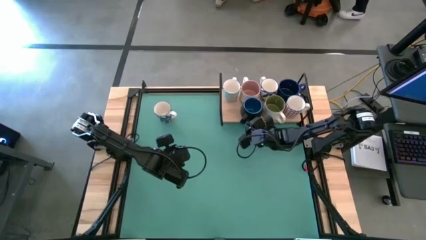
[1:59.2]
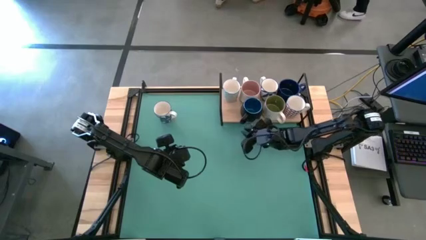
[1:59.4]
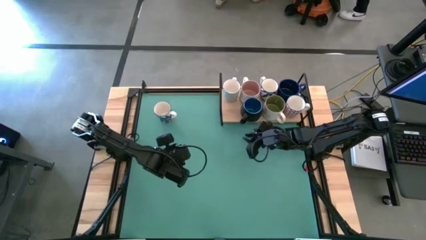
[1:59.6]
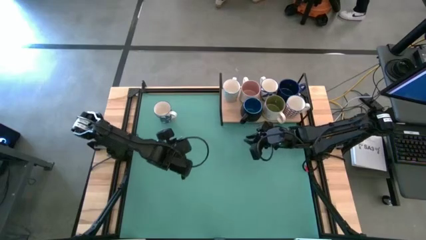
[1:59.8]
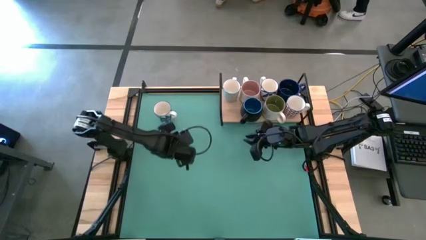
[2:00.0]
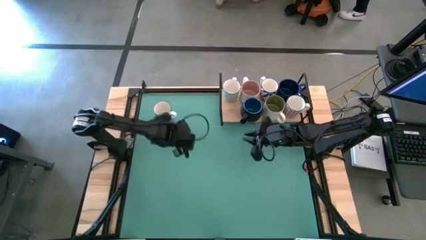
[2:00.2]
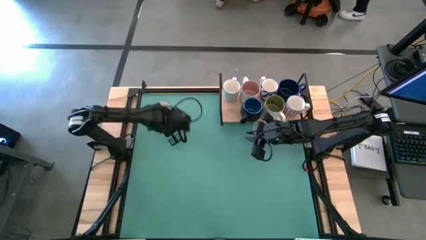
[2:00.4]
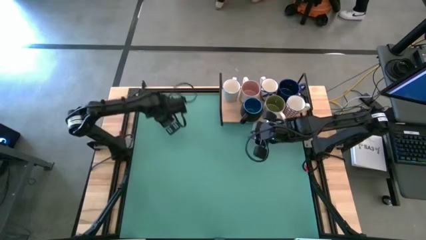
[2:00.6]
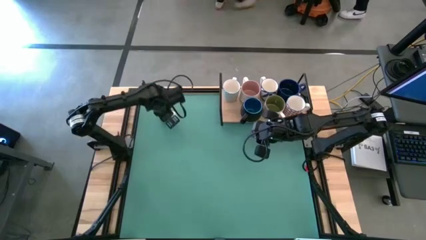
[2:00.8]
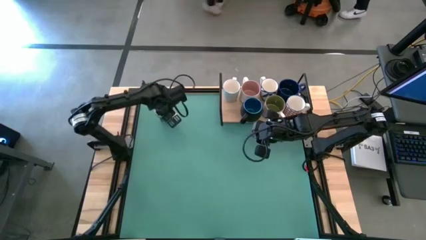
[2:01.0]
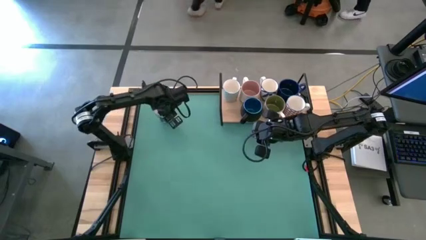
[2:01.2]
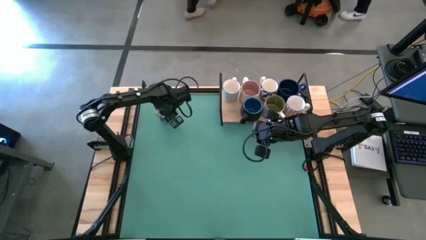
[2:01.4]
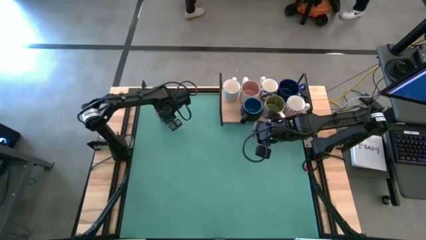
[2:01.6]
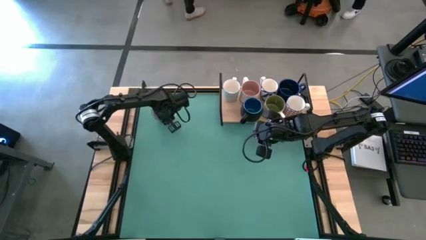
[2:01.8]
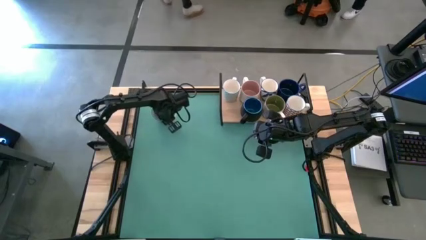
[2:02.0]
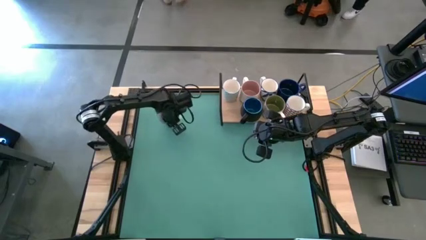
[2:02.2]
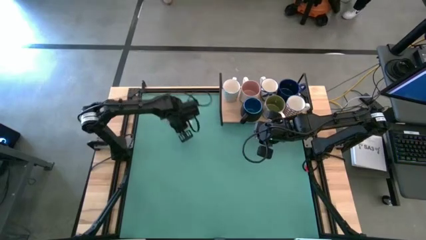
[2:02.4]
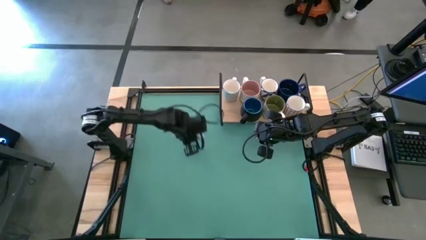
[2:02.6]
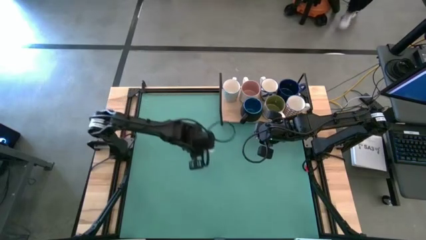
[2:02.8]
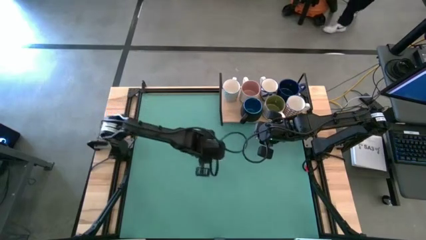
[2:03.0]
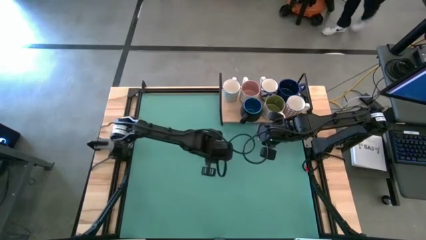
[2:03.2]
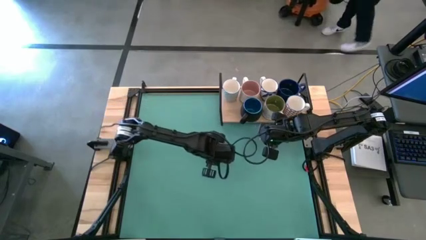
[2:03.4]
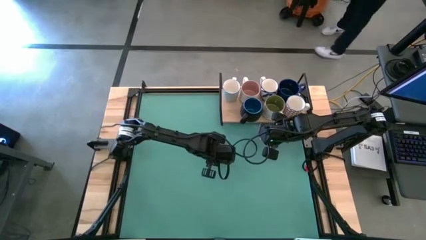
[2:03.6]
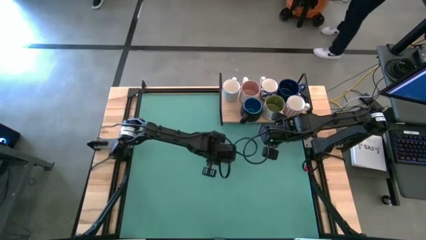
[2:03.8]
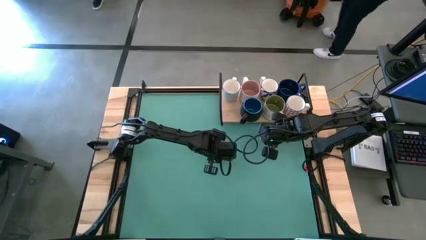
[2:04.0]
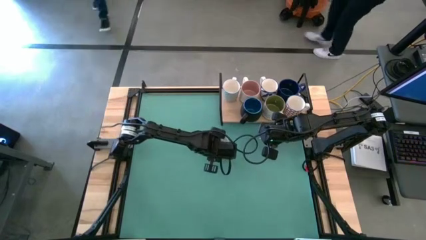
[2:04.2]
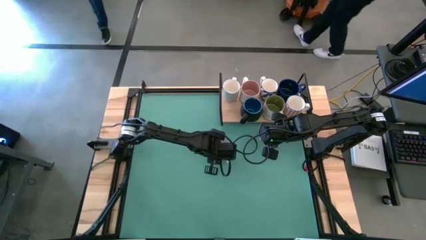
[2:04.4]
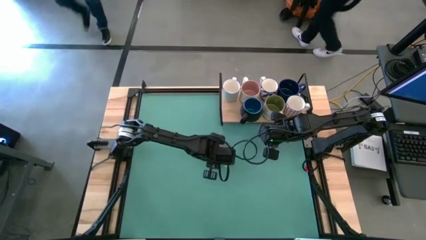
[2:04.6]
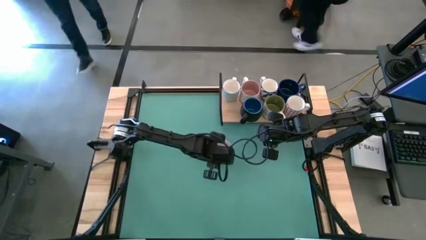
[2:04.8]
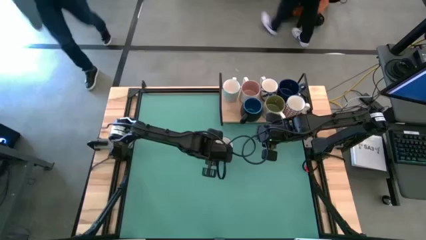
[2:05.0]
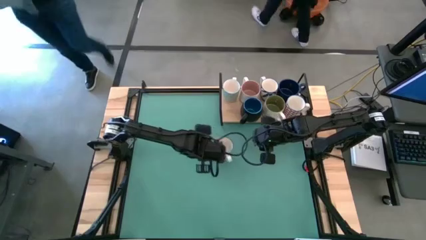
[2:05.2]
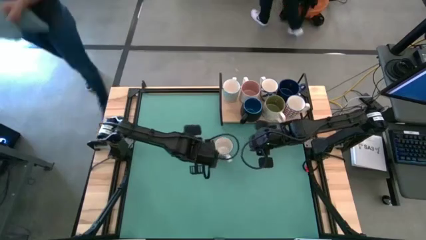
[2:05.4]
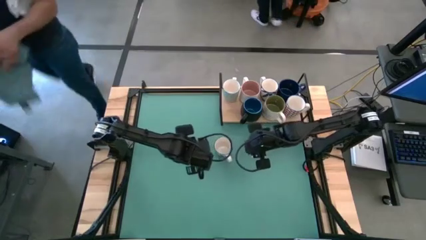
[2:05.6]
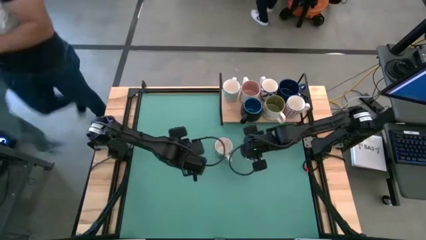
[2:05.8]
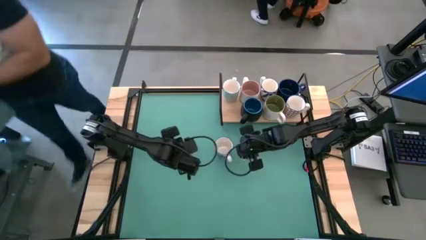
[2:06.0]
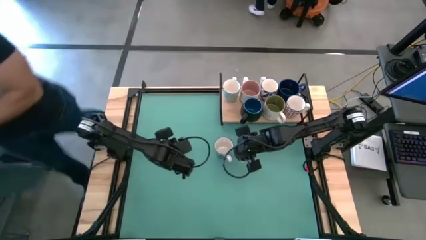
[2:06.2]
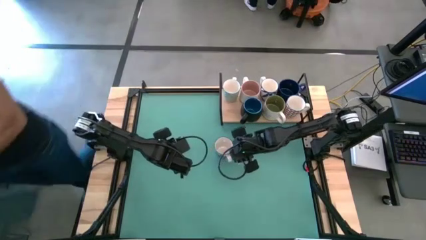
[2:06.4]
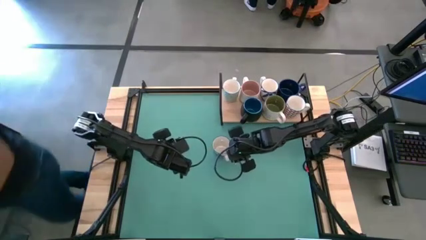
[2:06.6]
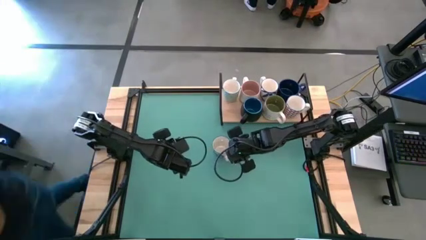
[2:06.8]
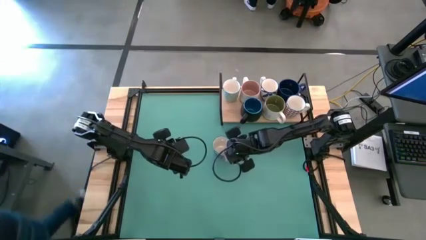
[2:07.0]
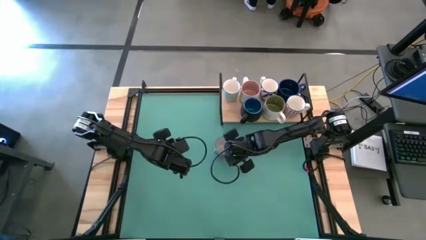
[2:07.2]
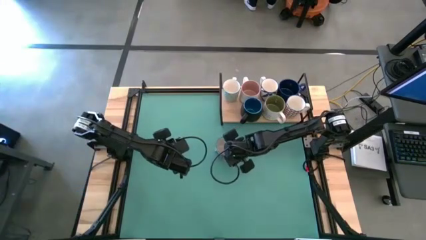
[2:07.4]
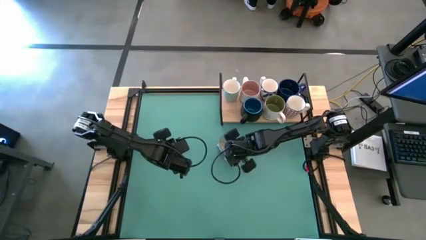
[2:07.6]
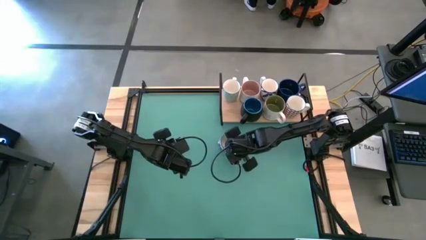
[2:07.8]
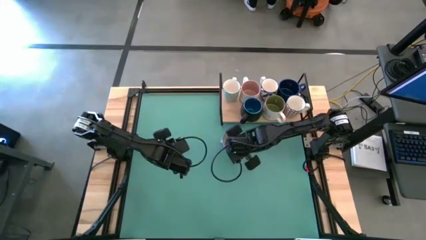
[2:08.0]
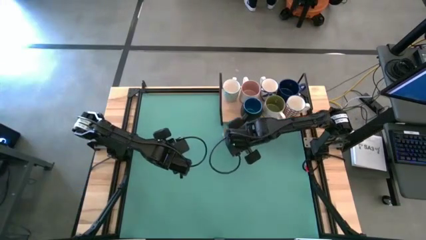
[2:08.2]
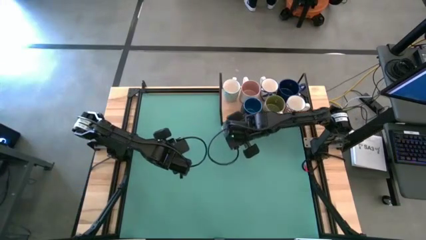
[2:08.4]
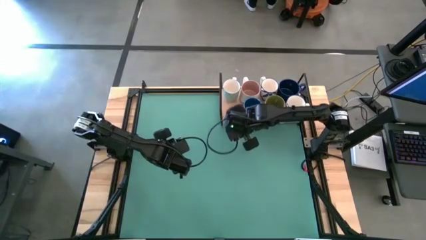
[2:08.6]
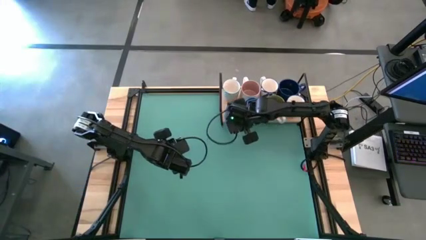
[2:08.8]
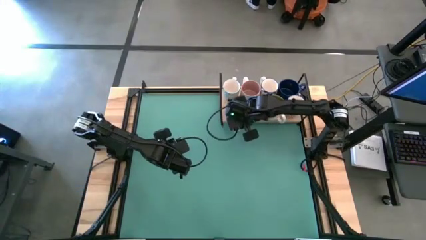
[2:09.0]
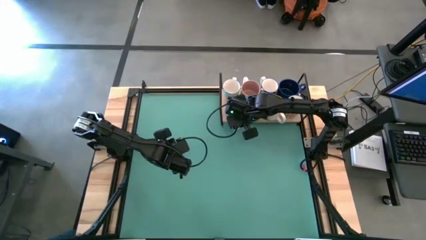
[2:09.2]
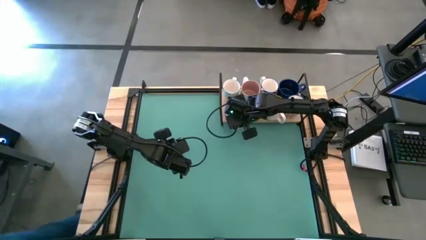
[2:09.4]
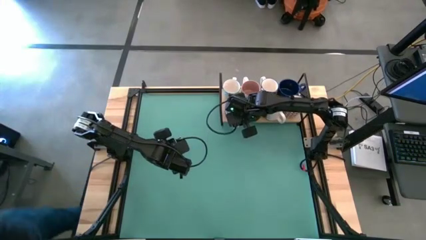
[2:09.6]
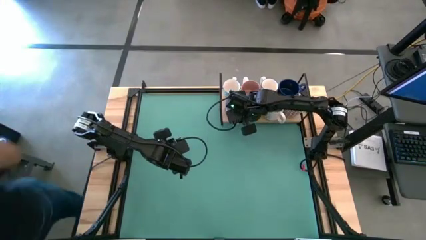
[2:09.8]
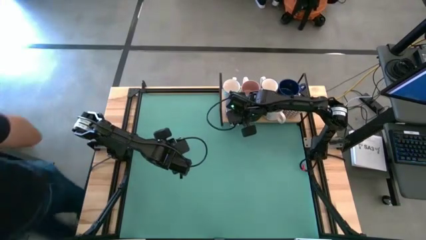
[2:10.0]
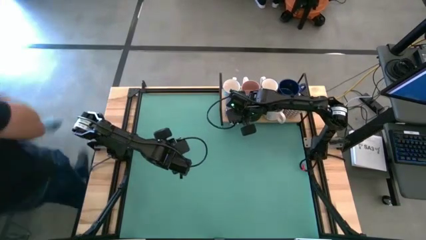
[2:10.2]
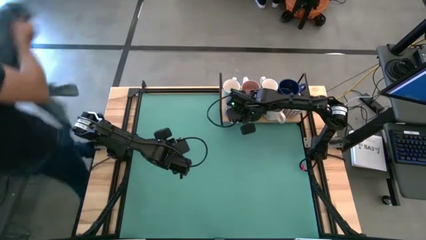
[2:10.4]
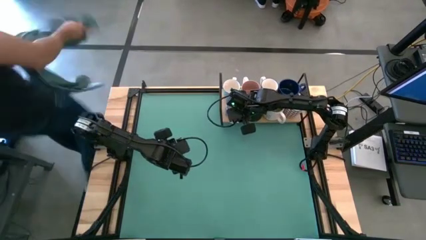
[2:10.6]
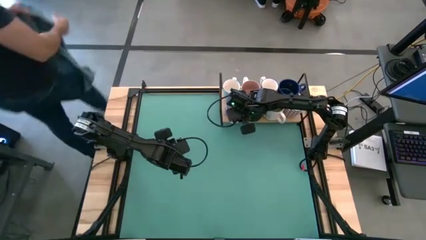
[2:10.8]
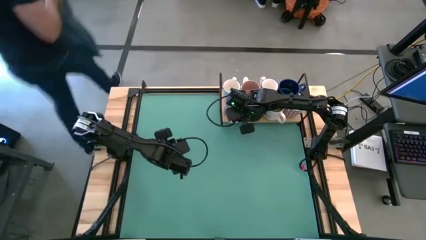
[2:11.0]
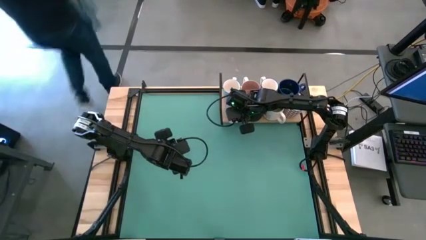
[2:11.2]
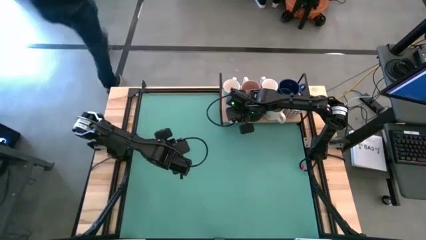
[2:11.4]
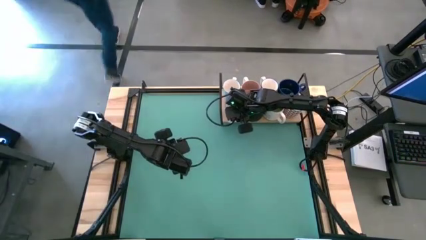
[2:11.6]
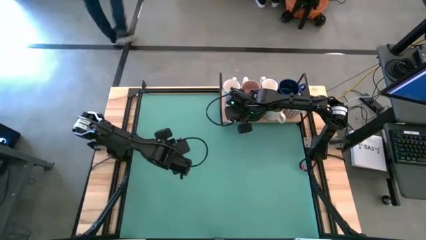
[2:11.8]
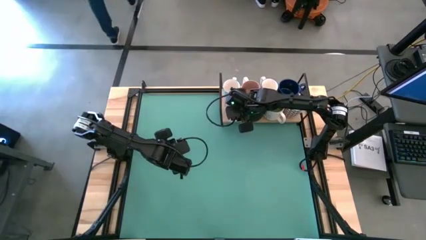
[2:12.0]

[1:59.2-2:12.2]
Task: Place coffee mugs
Put the blue white pattern mug on the shelf
